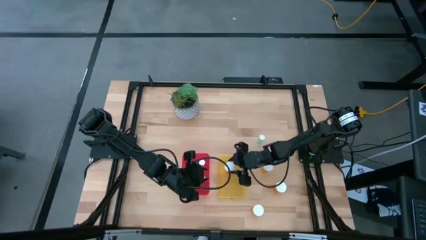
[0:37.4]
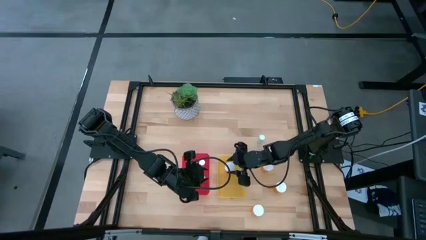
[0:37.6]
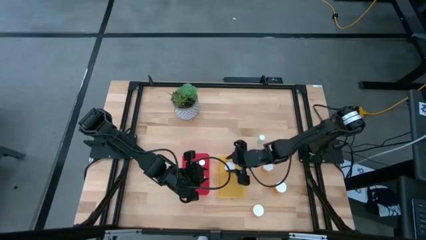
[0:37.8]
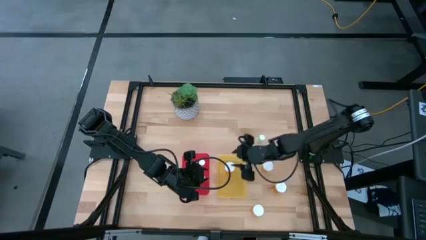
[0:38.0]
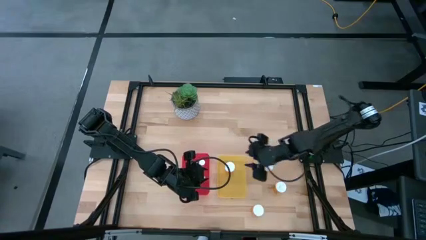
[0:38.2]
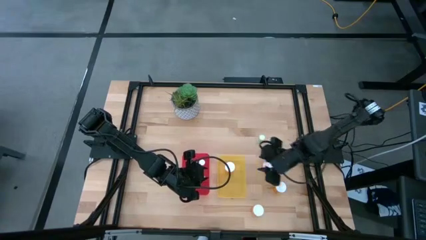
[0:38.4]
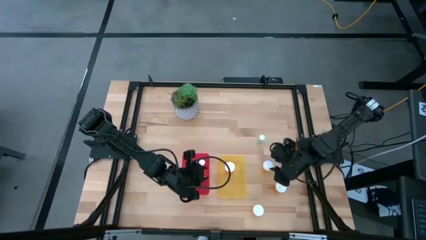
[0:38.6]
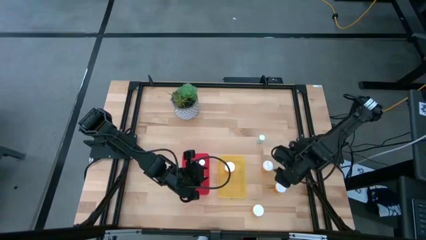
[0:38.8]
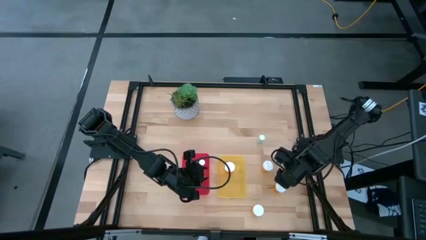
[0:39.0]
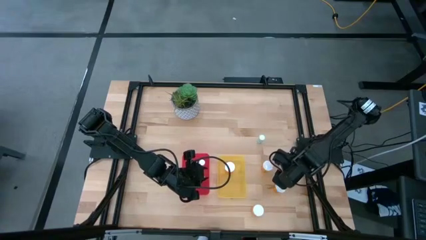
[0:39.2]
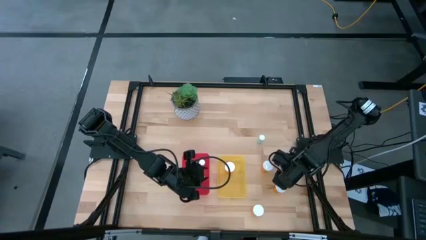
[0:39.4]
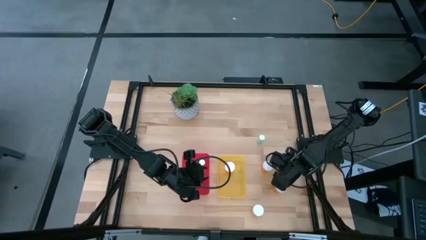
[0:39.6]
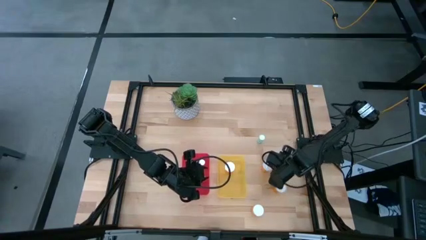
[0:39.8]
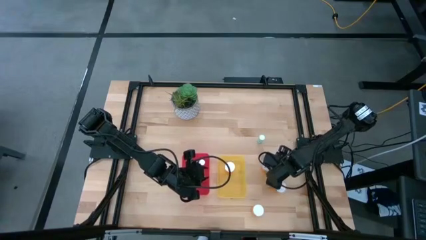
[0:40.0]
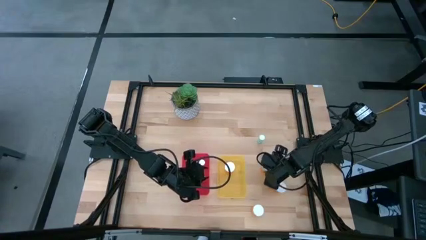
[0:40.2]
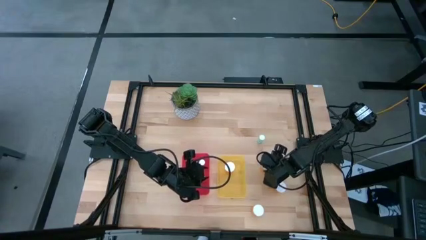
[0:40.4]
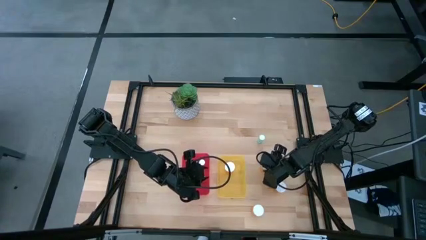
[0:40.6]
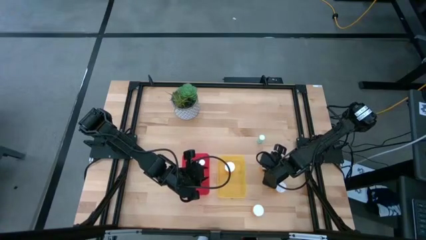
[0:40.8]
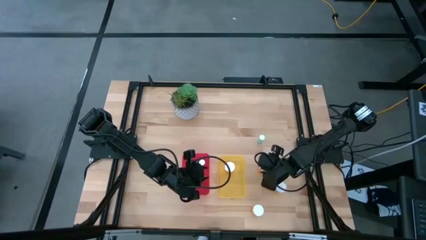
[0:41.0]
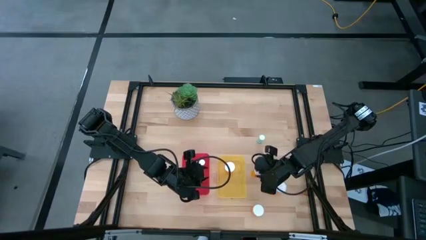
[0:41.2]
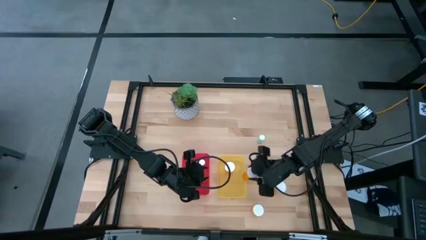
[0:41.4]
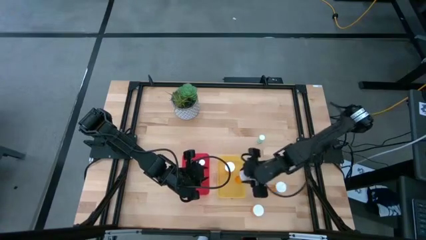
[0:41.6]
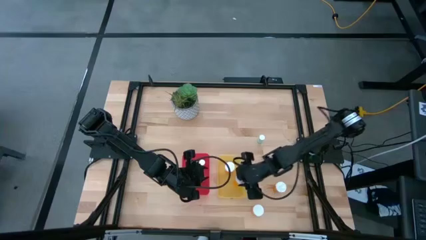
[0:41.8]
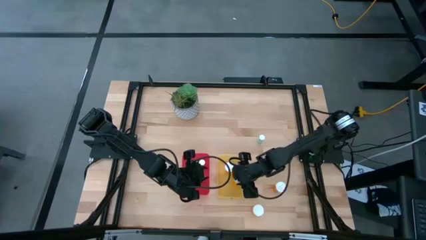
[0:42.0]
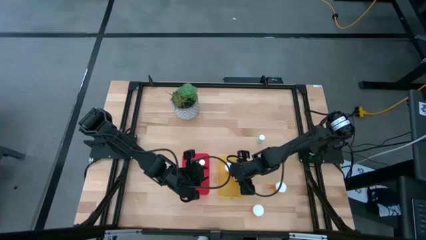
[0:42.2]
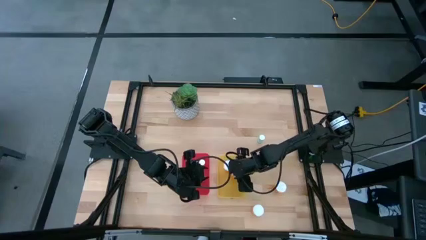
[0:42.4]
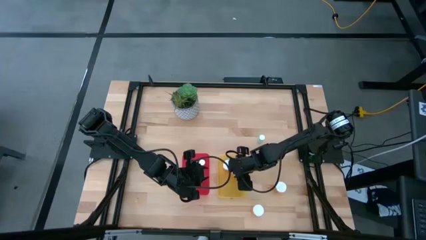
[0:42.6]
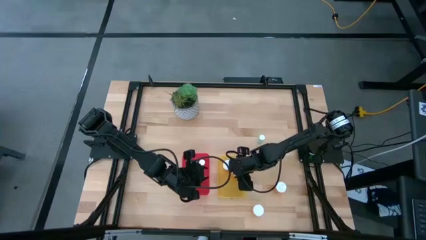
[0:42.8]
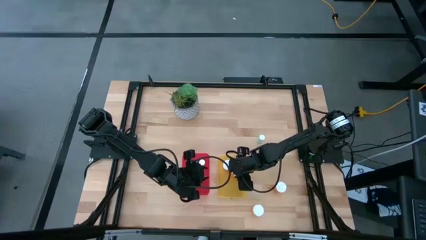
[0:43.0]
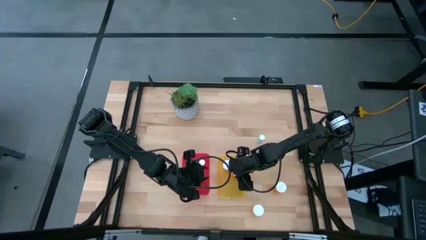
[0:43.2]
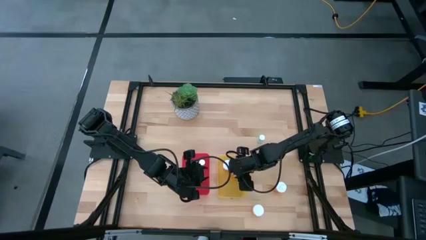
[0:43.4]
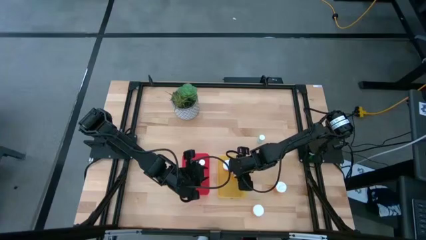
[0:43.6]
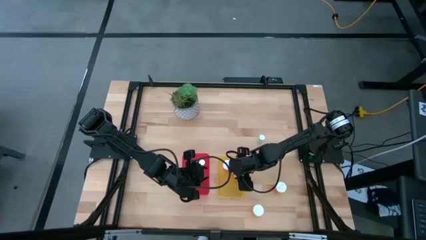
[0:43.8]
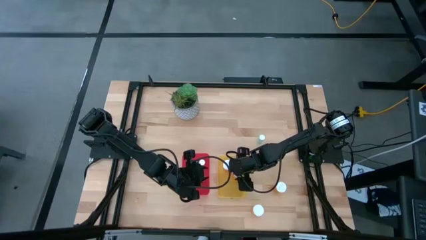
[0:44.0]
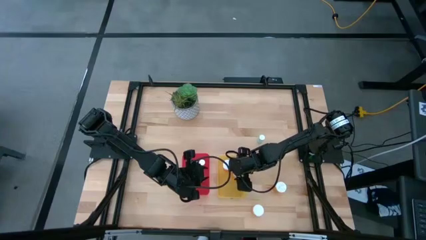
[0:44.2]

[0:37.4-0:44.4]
Task: Pick and place medicine bottles into bin by pill shape (circle, oval)
Put the orange capsule bottle into the yellow bin

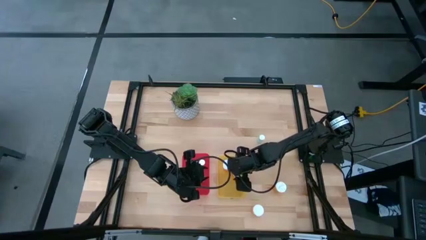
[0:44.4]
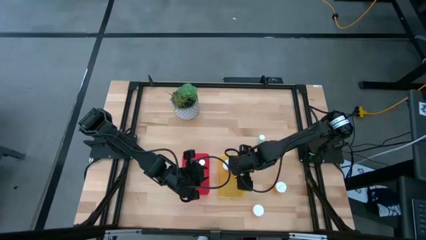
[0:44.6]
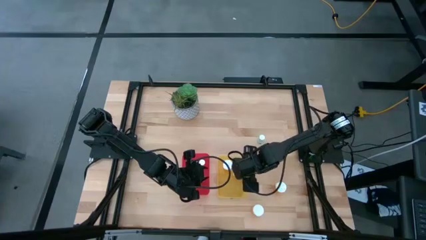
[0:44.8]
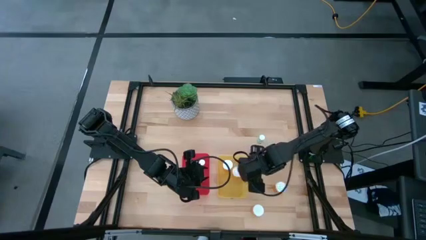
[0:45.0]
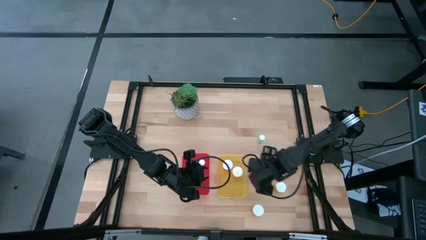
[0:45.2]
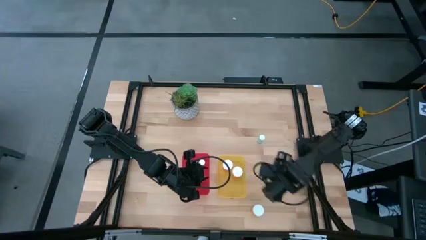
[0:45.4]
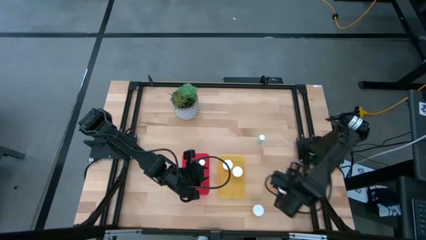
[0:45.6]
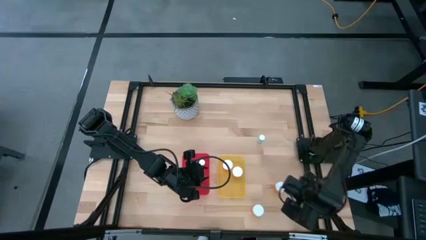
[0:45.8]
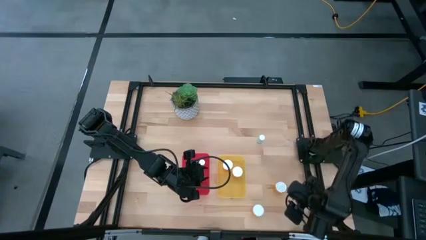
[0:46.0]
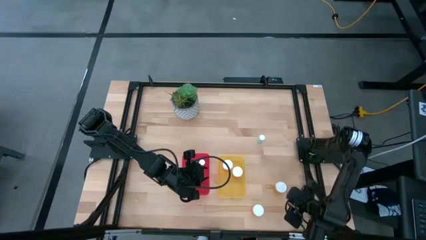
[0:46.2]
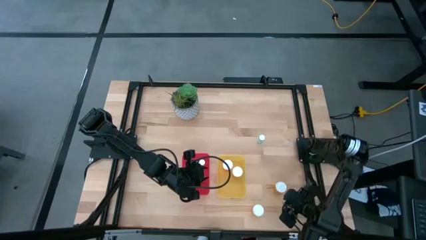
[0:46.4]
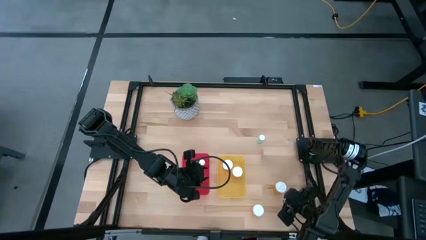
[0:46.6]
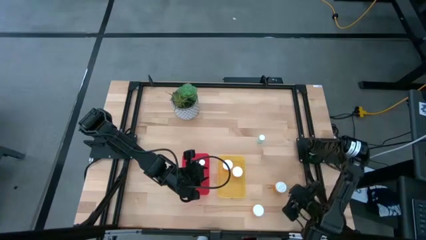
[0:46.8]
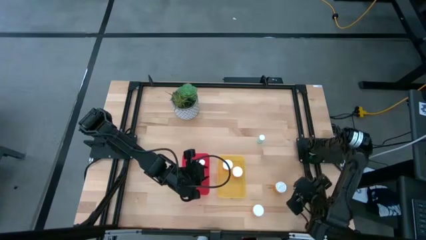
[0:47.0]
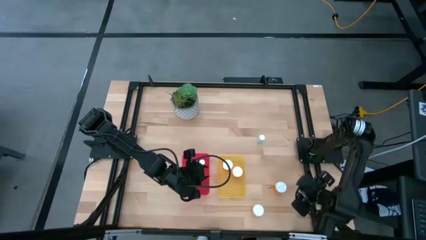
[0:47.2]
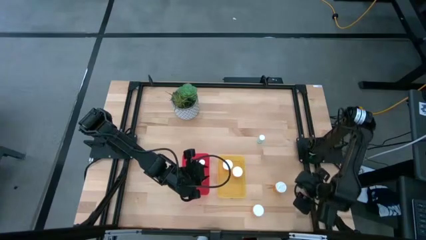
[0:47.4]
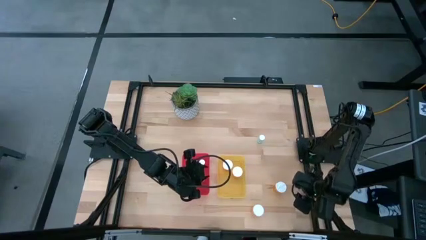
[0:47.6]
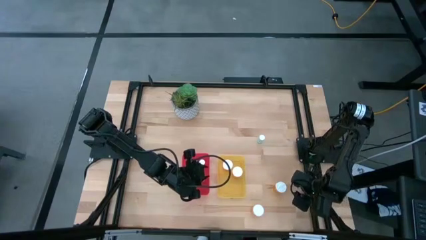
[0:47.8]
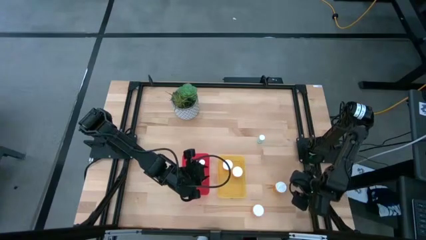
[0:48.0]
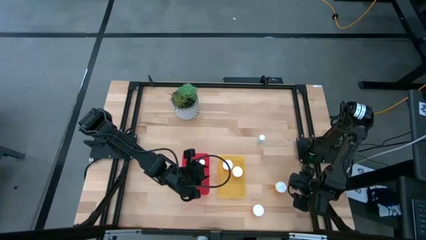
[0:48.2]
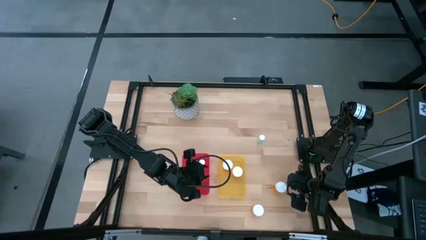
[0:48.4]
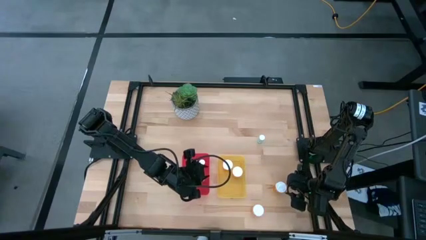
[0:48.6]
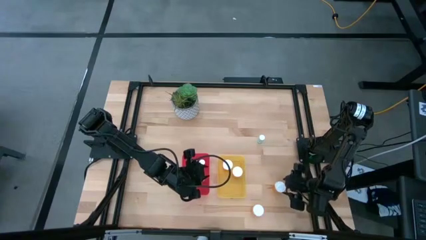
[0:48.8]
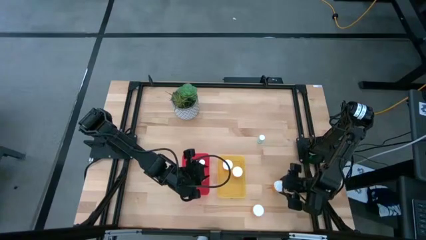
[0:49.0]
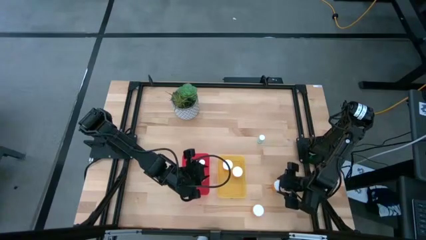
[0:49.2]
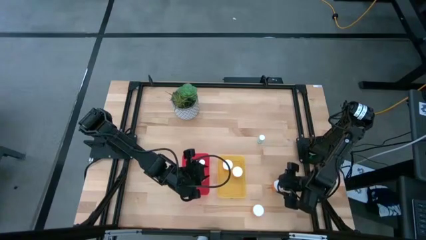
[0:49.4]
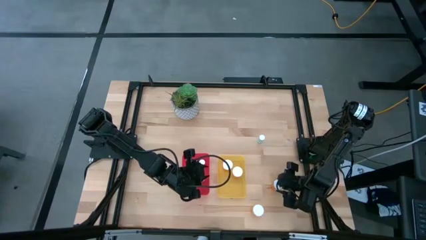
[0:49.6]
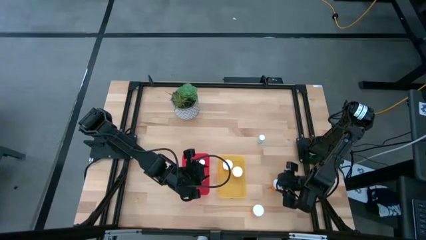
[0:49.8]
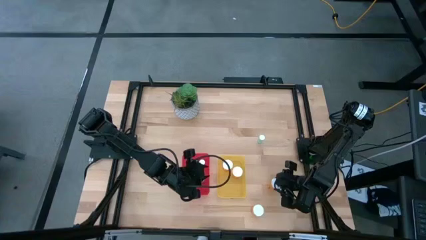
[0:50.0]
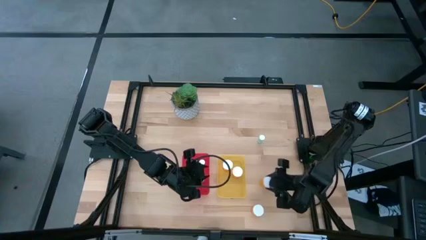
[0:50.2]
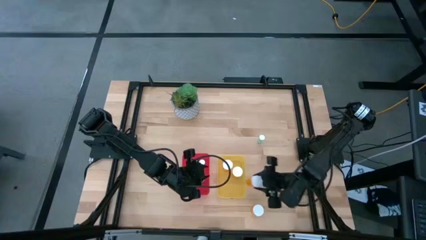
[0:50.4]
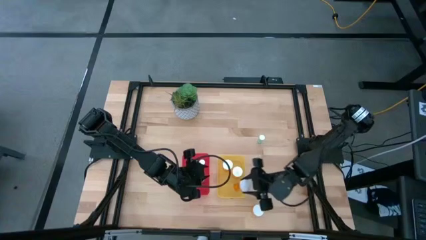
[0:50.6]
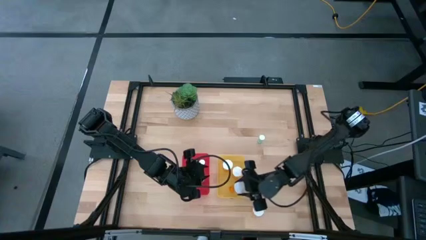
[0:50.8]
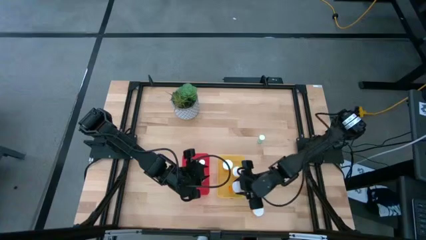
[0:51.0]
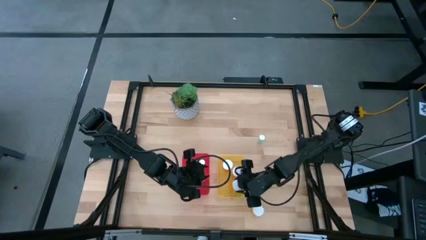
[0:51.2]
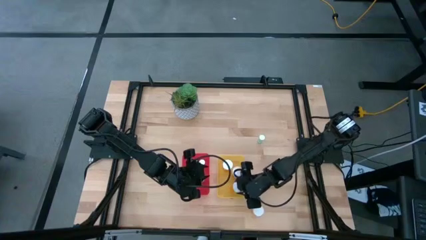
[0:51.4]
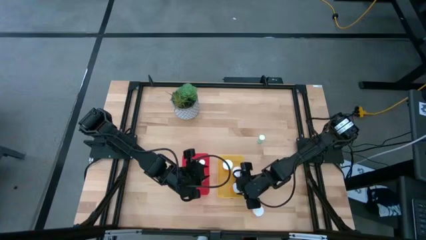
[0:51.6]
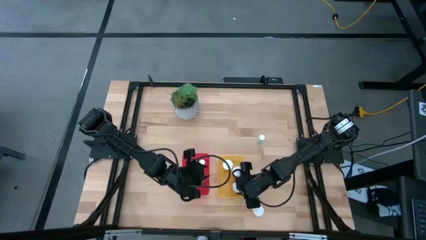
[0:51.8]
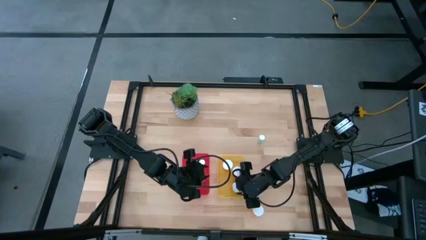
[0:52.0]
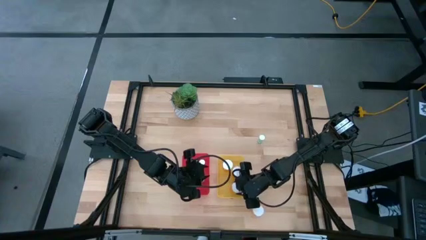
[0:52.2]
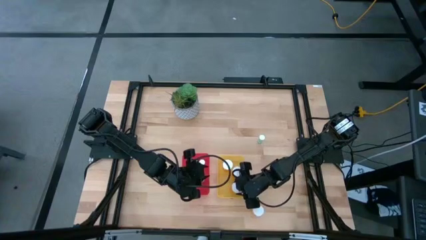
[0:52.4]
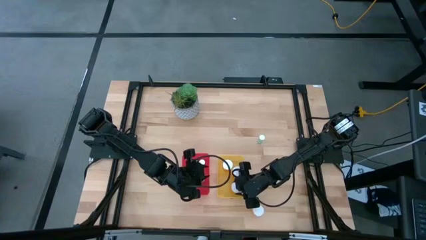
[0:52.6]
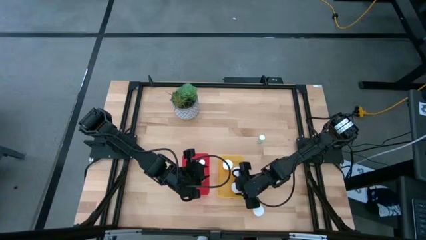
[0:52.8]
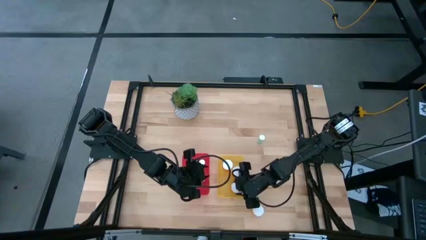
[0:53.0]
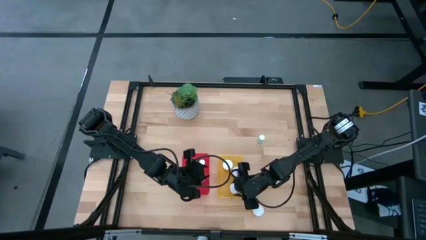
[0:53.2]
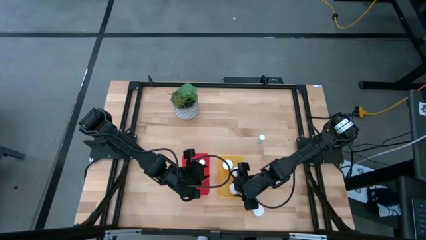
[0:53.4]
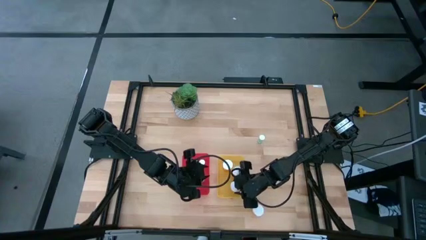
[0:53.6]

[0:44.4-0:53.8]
Put the orange capsule bottle into the yellow bin
